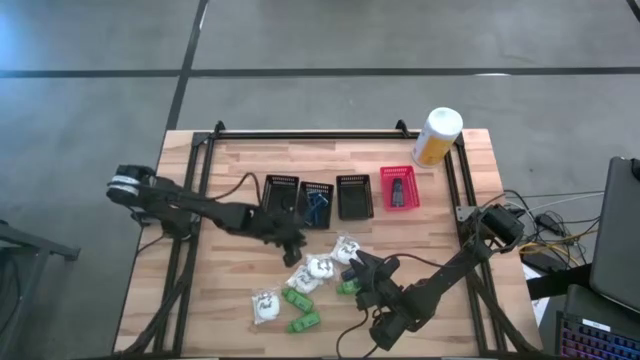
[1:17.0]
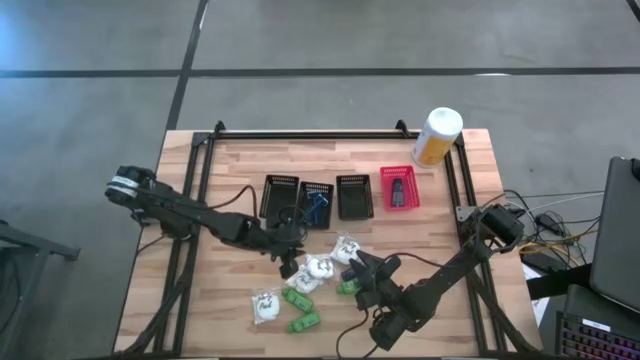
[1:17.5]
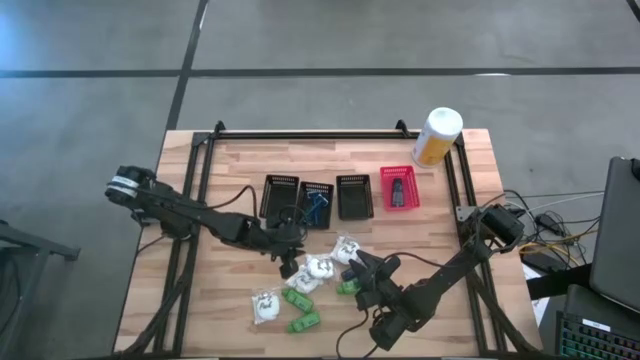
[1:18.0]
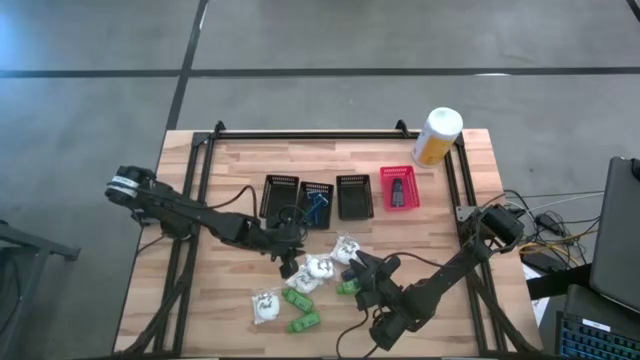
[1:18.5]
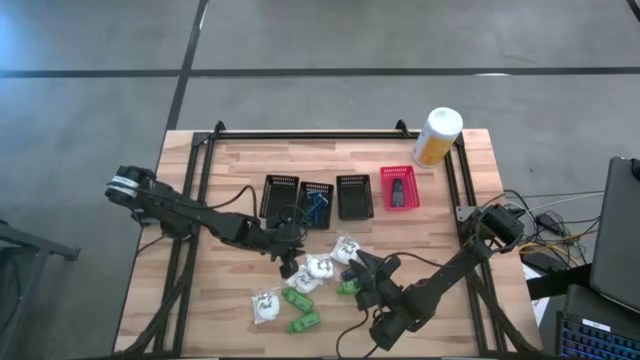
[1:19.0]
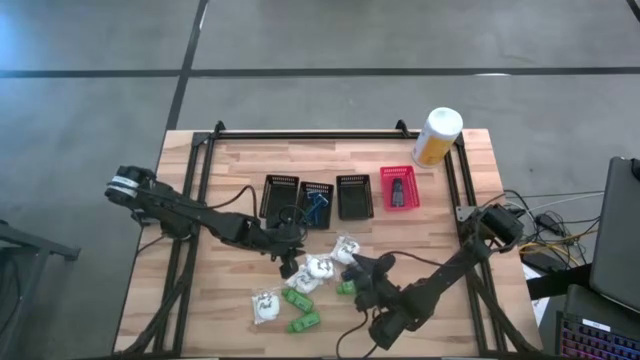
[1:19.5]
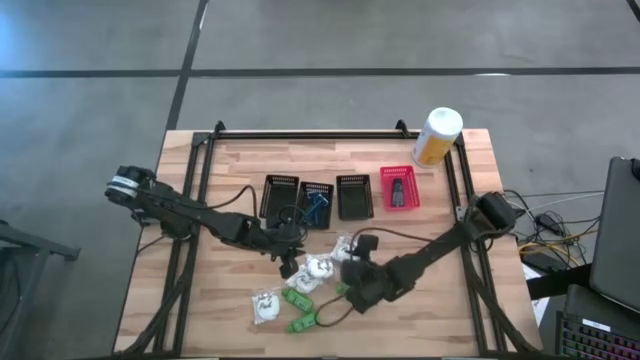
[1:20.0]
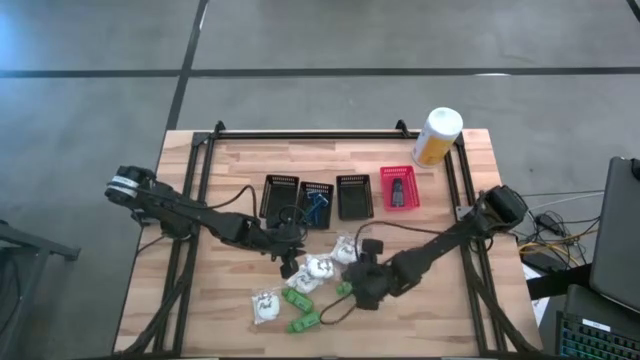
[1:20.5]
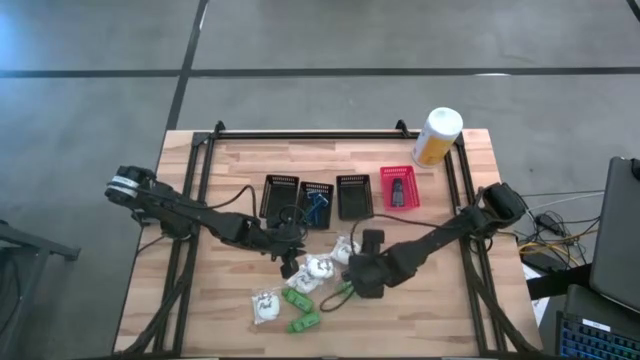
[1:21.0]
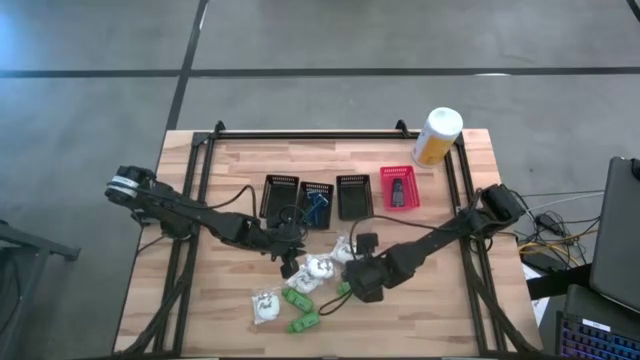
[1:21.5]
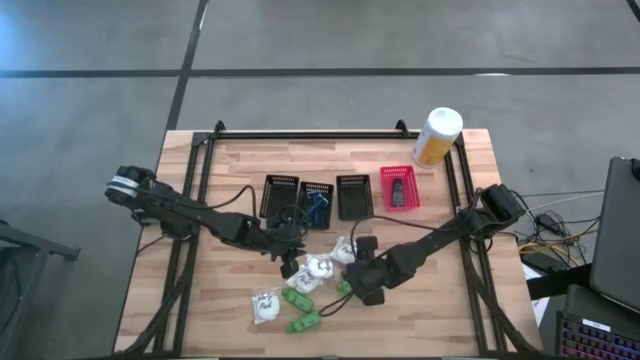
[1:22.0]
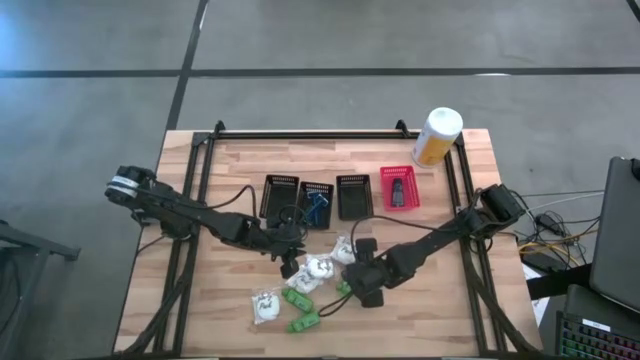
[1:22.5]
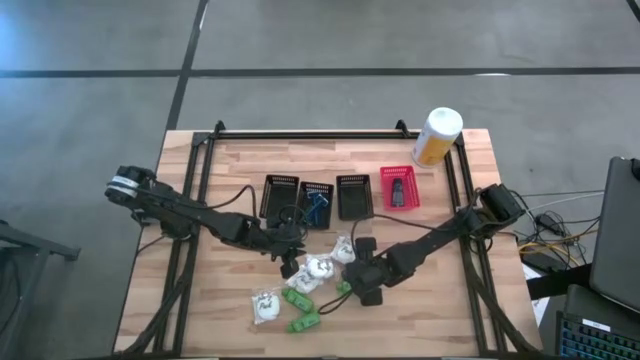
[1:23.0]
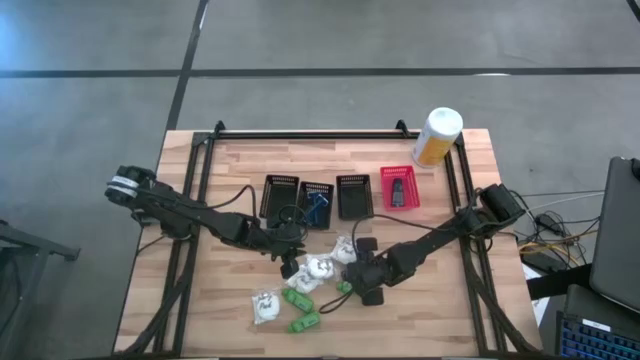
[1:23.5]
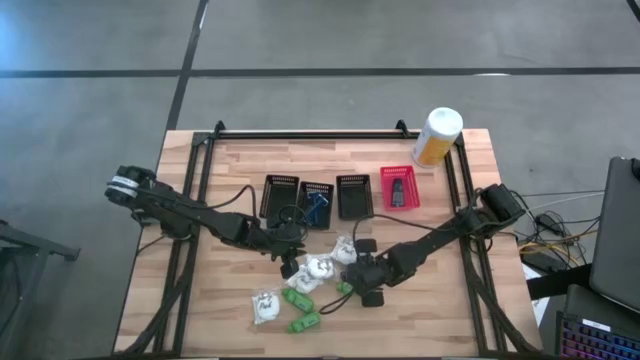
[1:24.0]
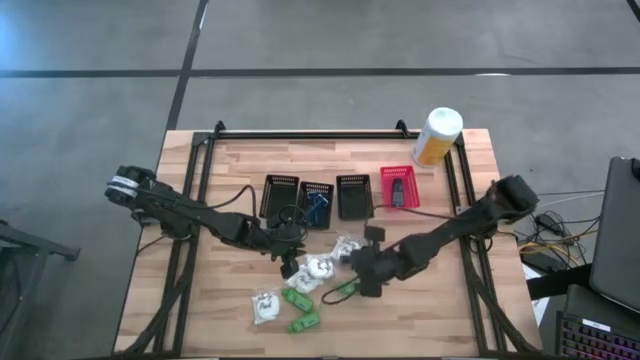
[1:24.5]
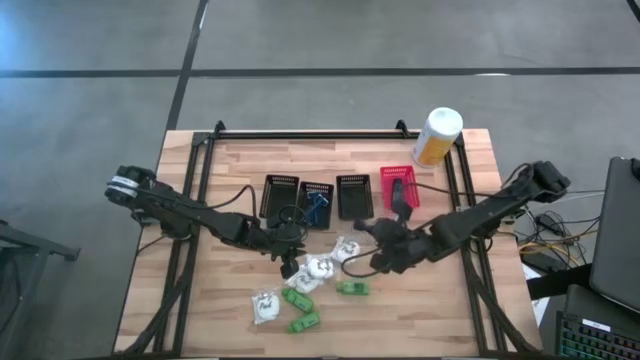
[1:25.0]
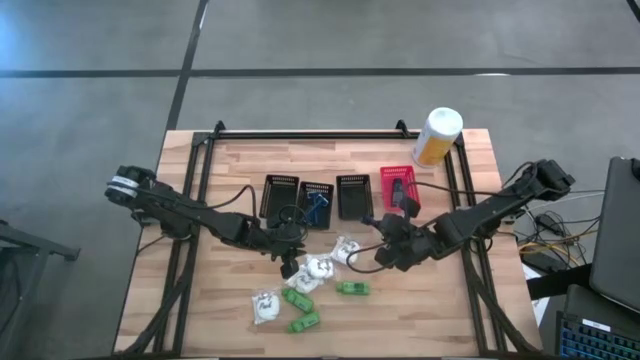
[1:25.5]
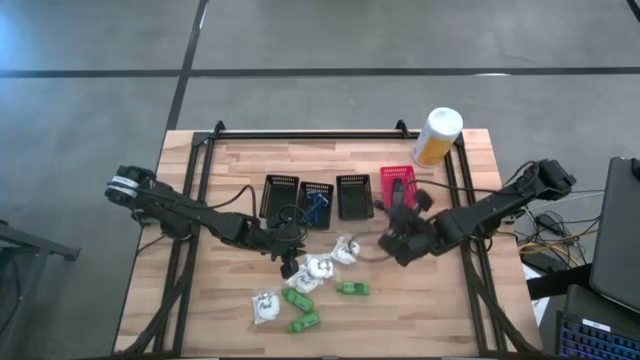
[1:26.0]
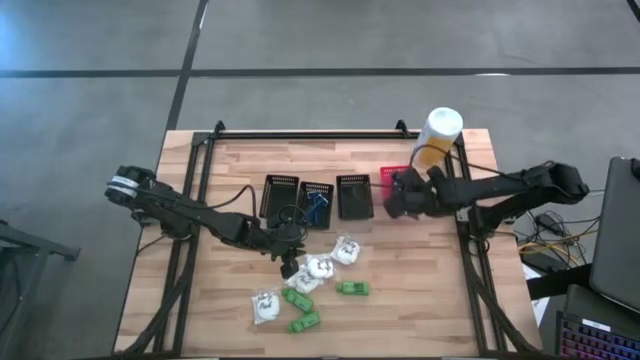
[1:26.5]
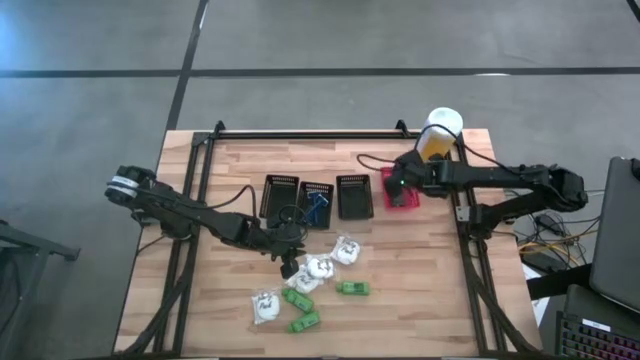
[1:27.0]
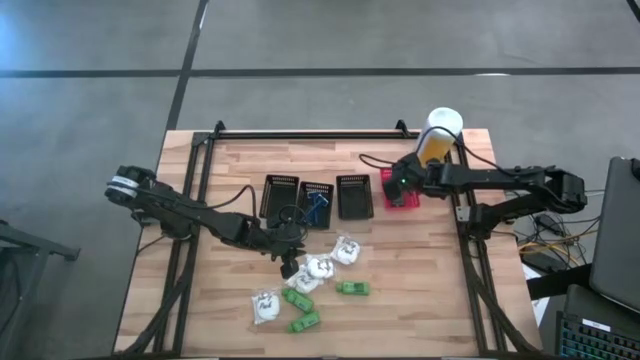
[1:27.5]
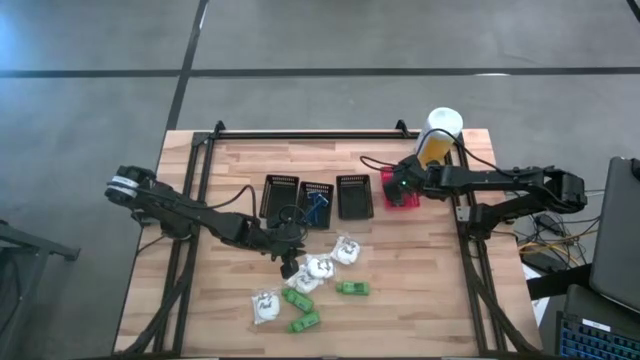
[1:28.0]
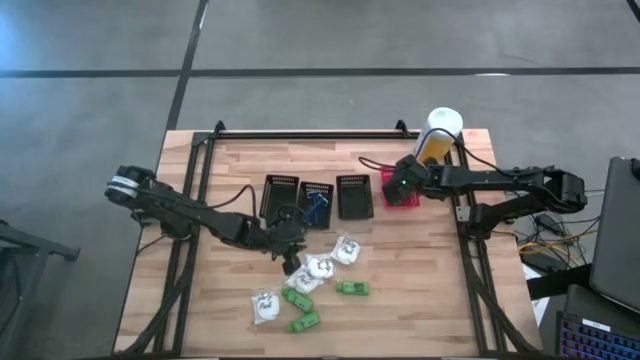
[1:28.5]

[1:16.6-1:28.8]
Task: Pick & Place Travel size toiletries
Put the blue shave cream into the red bin

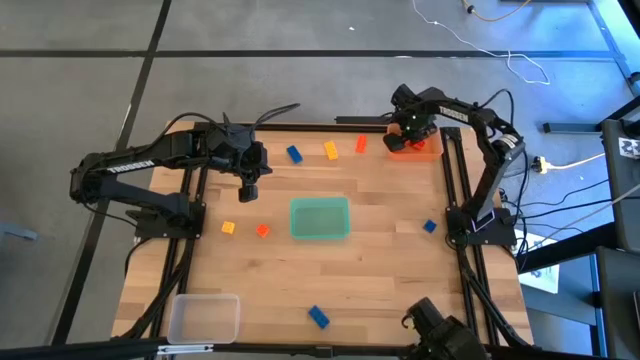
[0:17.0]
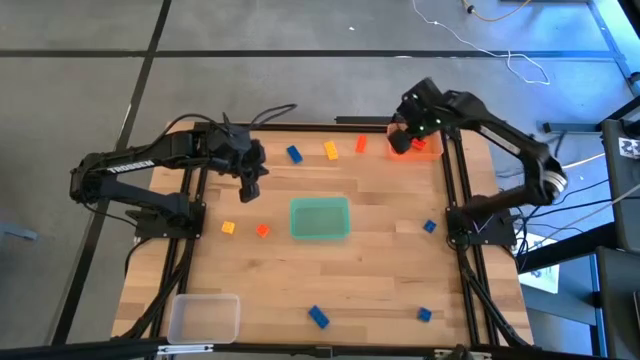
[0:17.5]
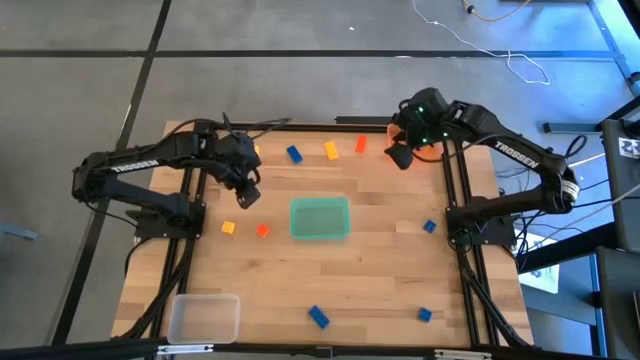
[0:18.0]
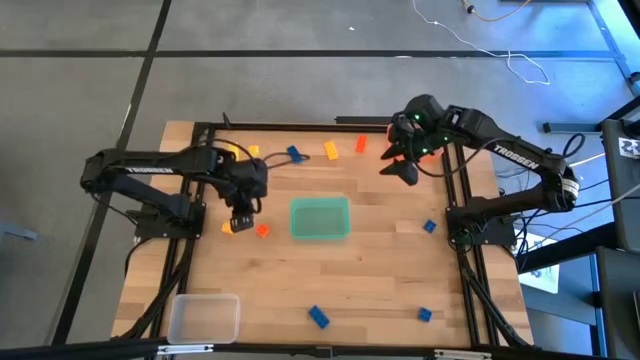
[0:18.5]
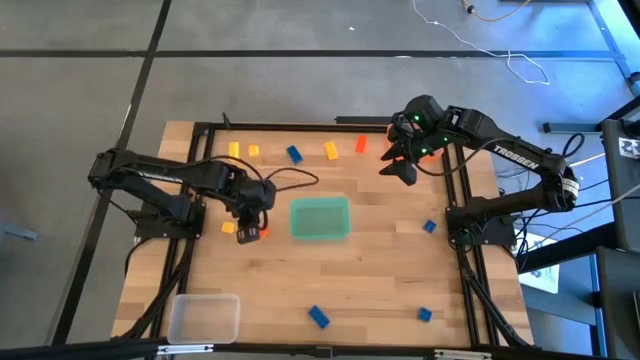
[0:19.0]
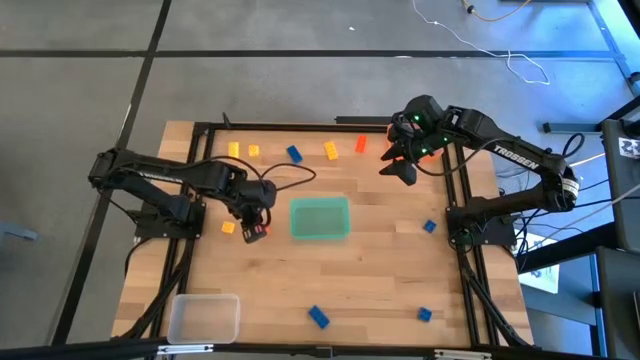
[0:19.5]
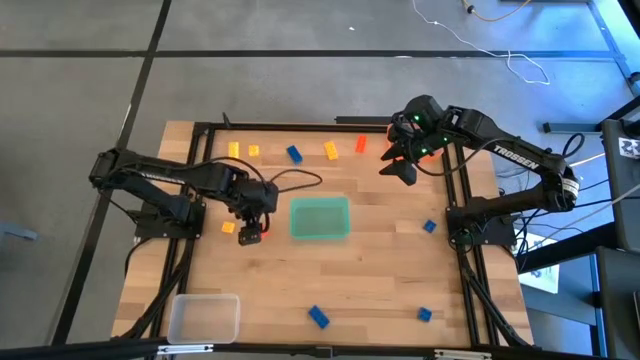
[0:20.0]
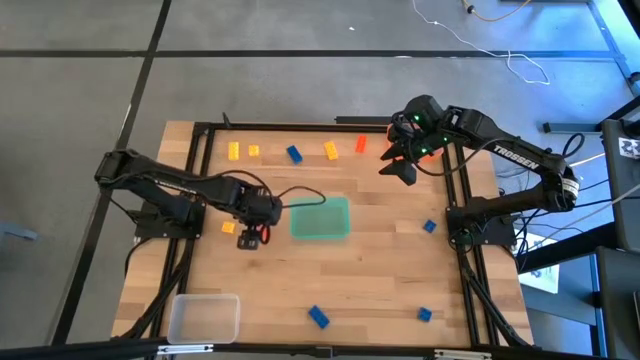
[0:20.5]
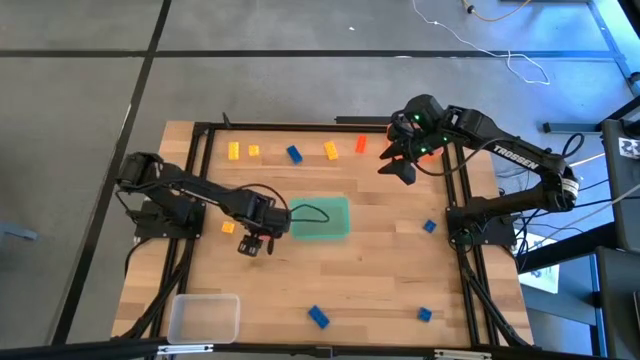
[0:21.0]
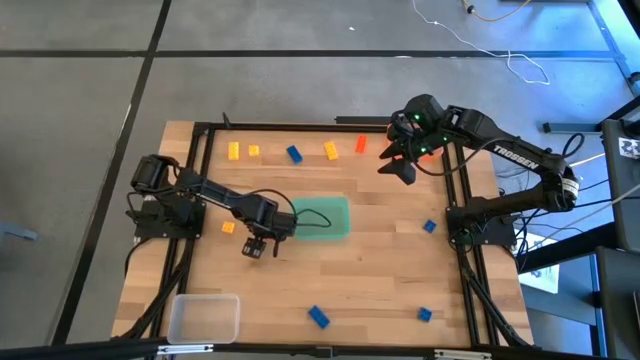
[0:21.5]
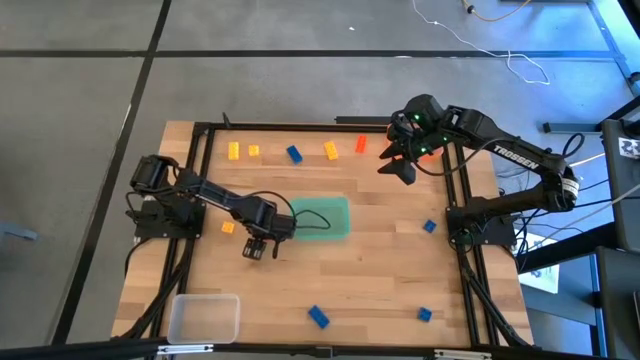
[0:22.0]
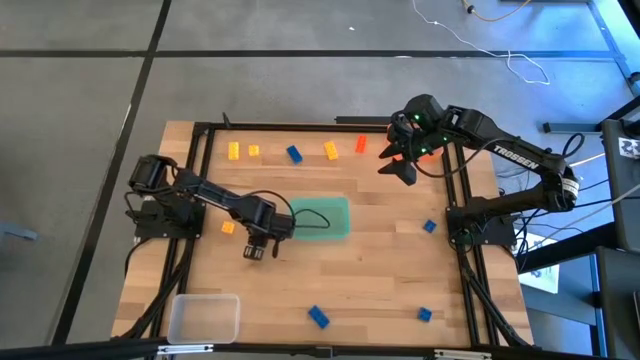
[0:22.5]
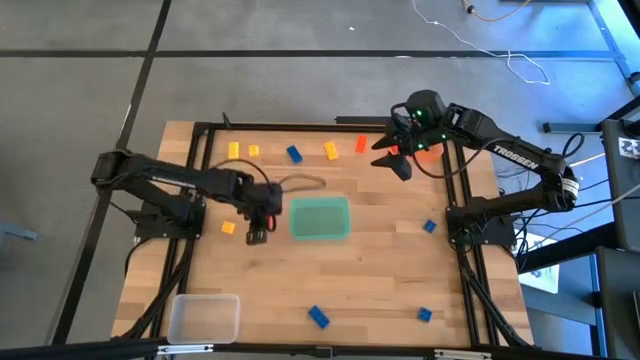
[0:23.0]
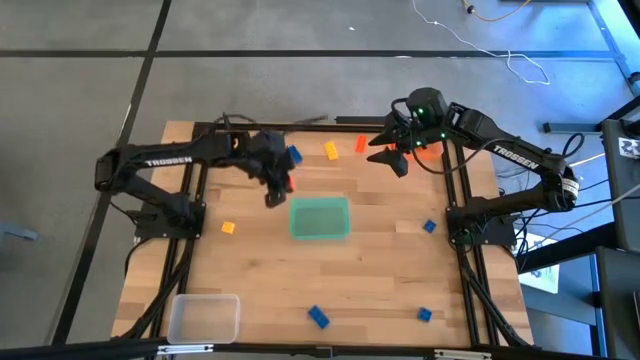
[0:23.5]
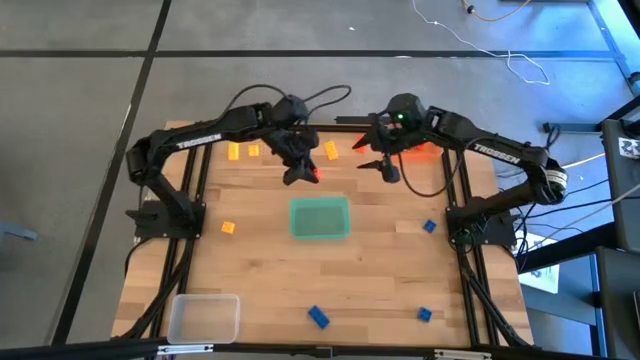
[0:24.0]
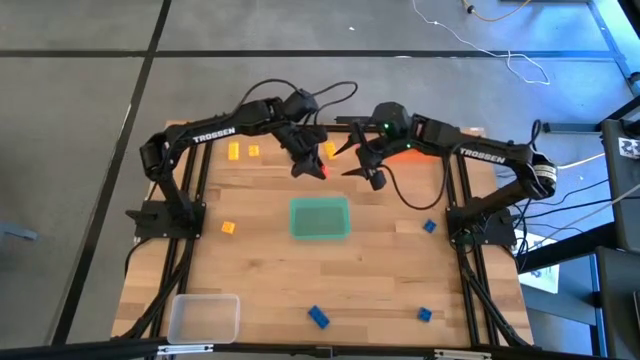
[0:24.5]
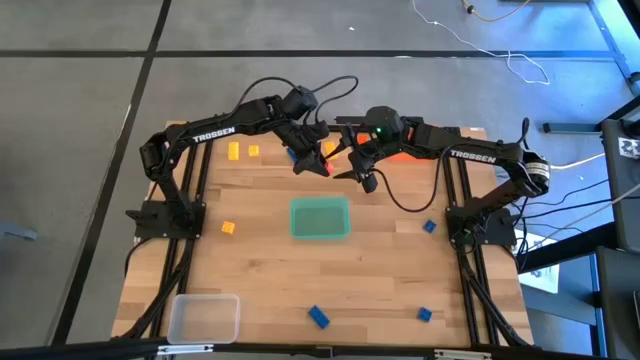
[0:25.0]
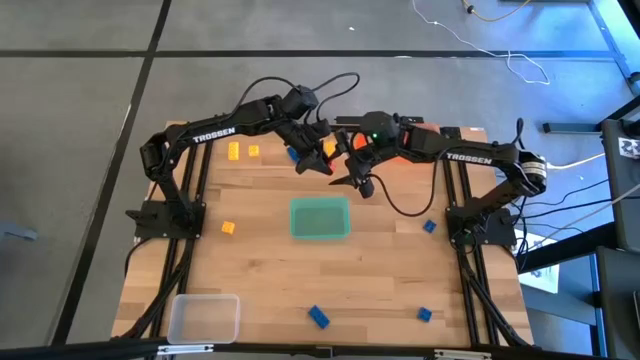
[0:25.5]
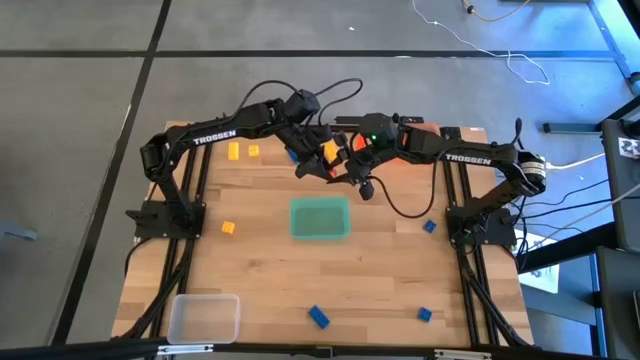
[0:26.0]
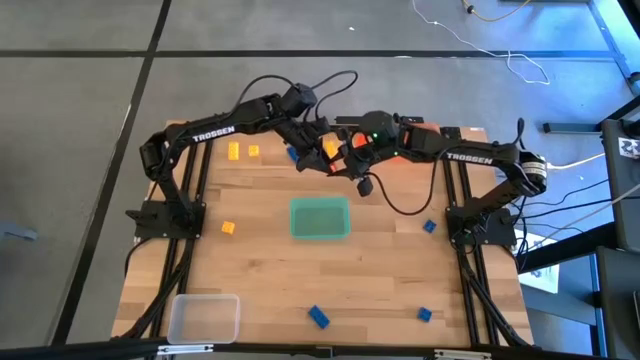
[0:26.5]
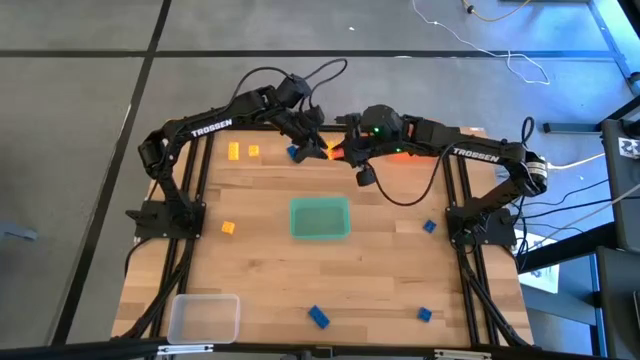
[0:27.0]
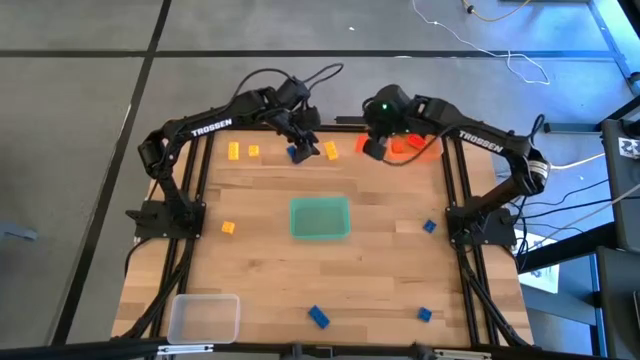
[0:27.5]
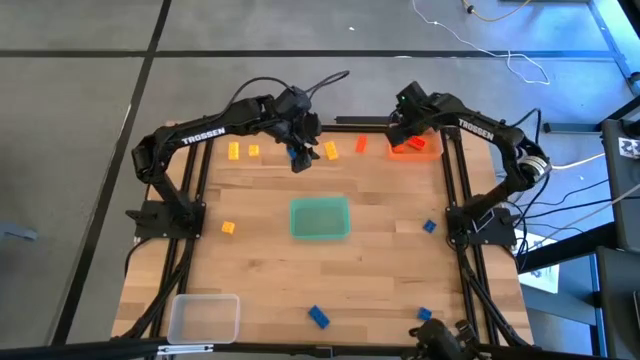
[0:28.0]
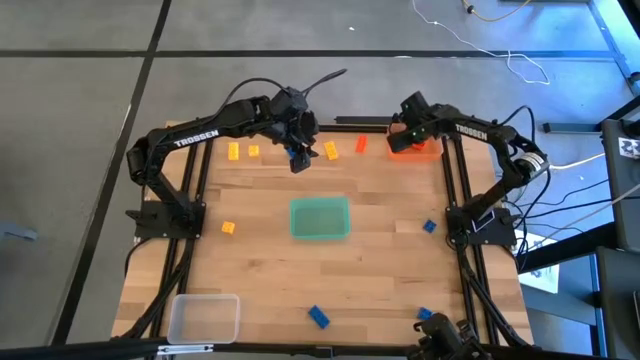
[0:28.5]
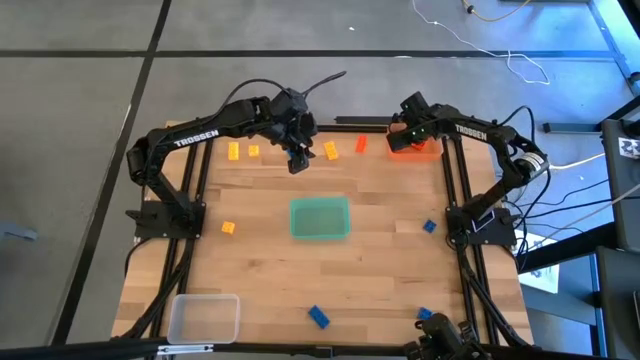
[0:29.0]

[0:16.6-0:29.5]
Task: Sort & place blocks by color
Put the orange game piece into the orange bin
